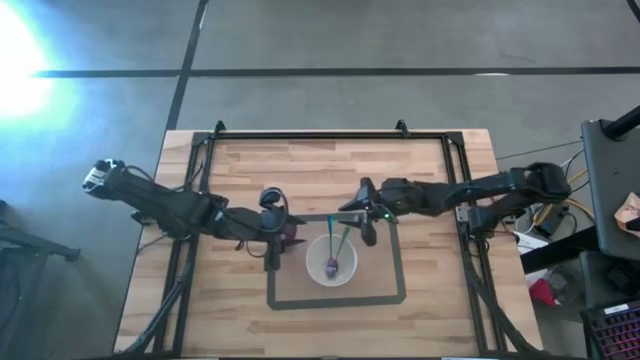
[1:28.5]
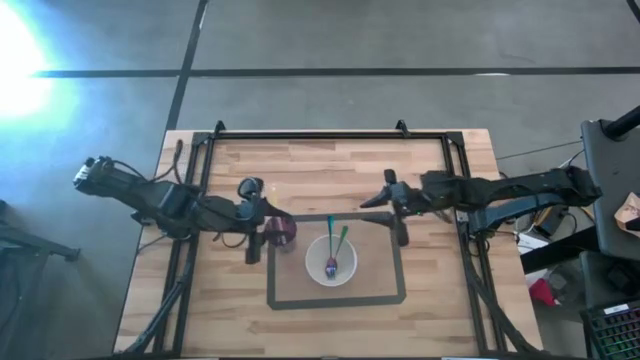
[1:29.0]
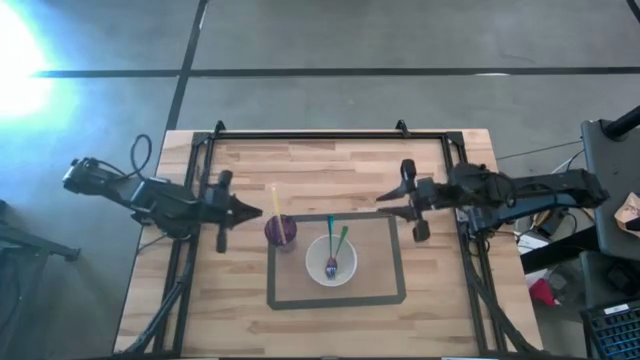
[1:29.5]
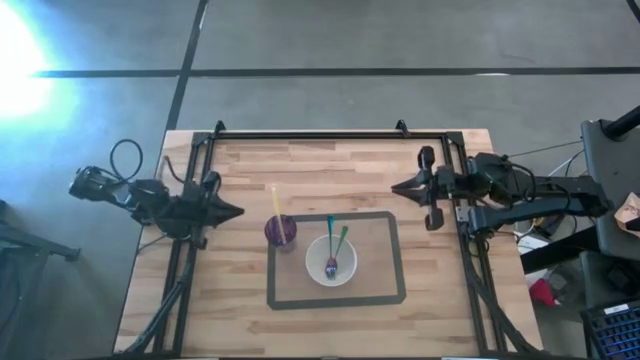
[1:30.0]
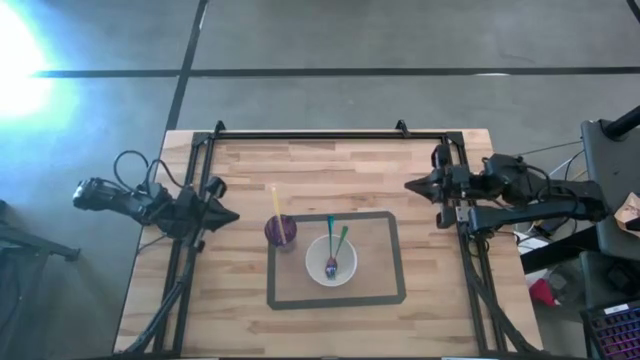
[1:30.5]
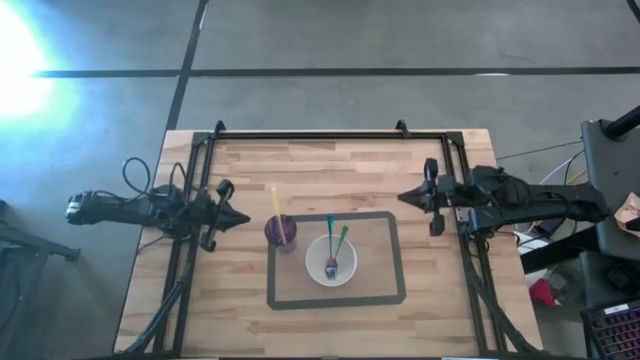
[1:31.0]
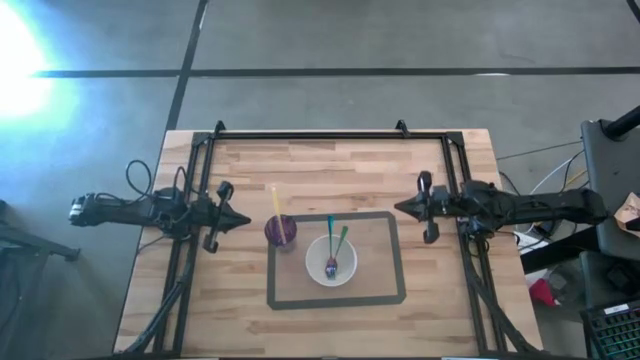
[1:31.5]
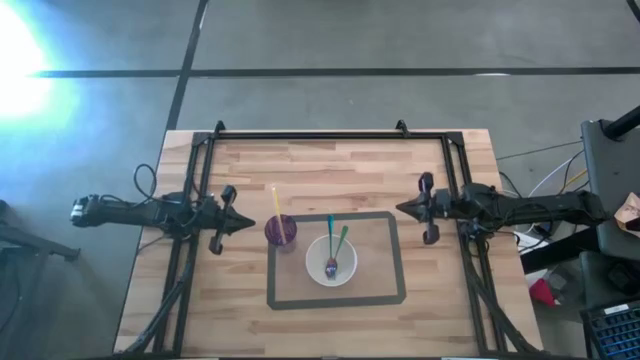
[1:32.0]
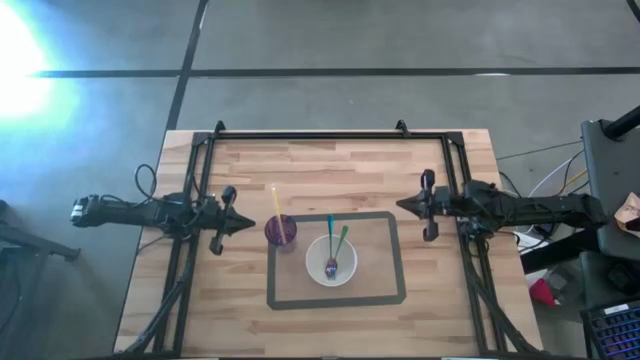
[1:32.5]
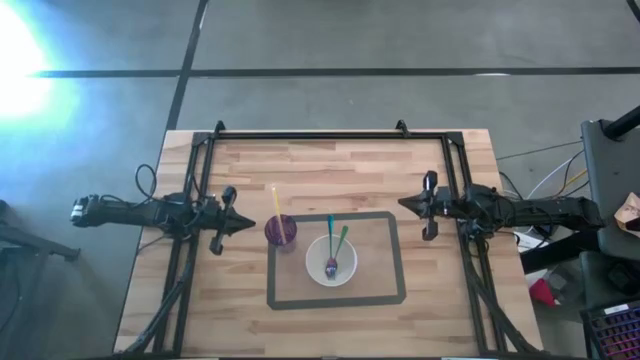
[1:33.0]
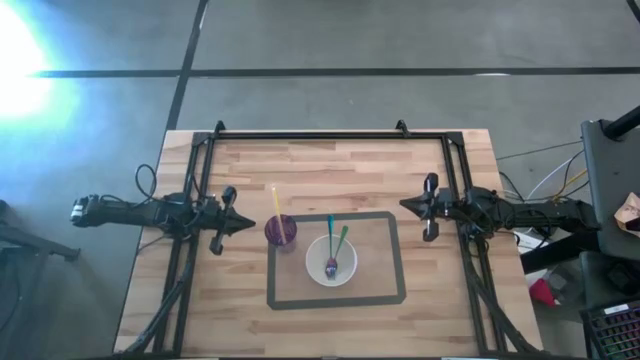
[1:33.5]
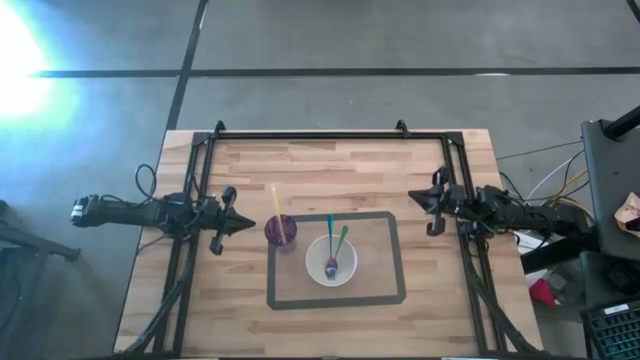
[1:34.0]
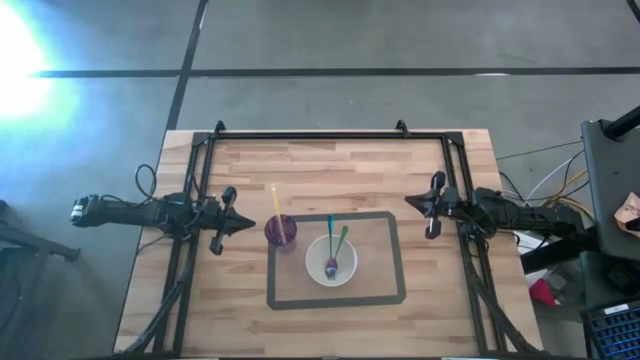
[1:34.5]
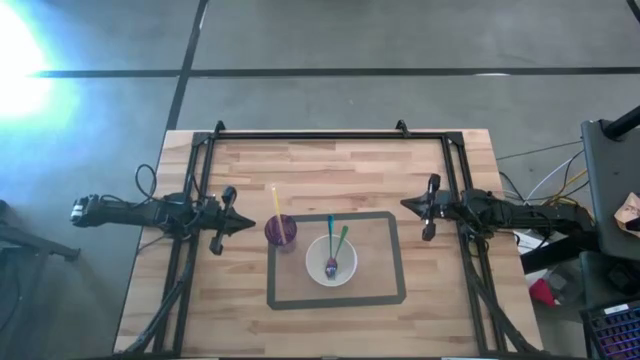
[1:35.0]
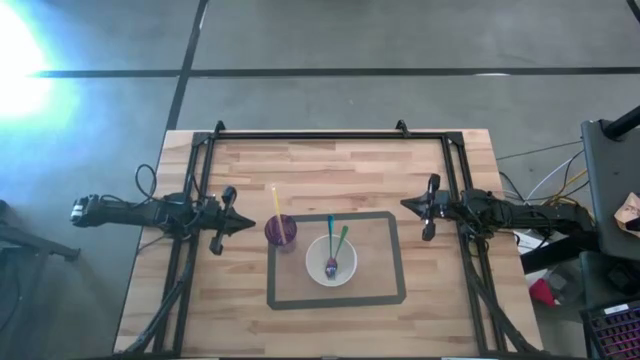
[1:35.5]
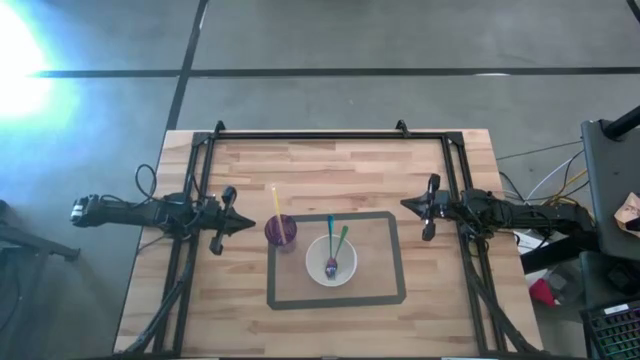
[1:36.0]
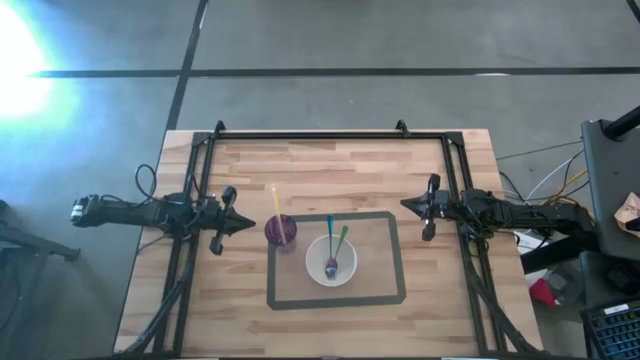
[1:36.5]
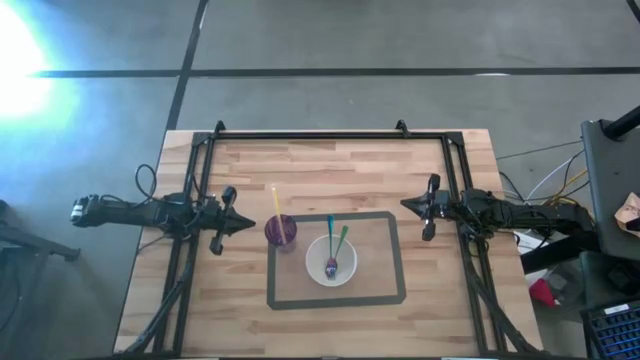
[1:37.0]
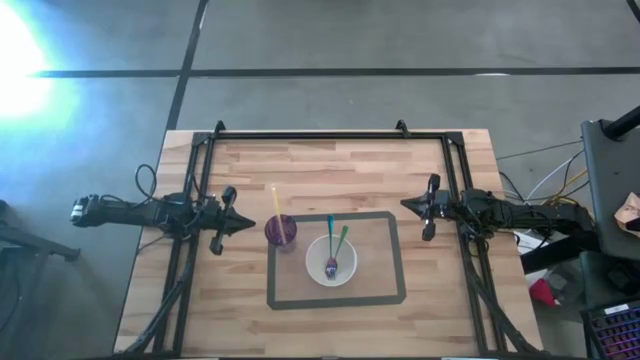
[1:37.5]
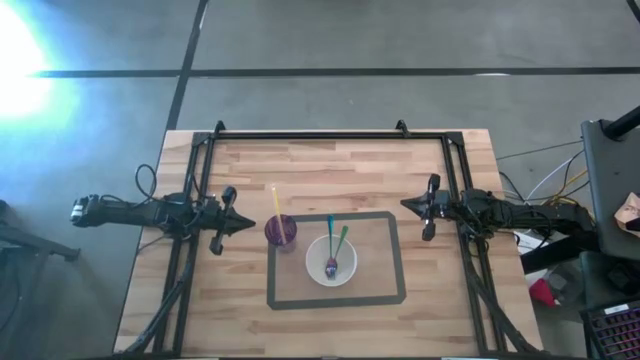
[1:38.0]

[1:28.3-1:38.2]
Task: Pick & Place Utensil
Return to Home Position

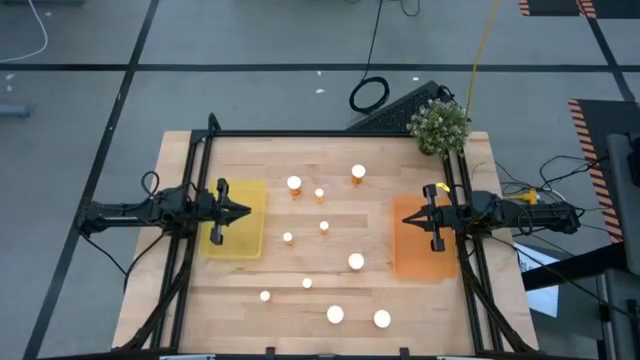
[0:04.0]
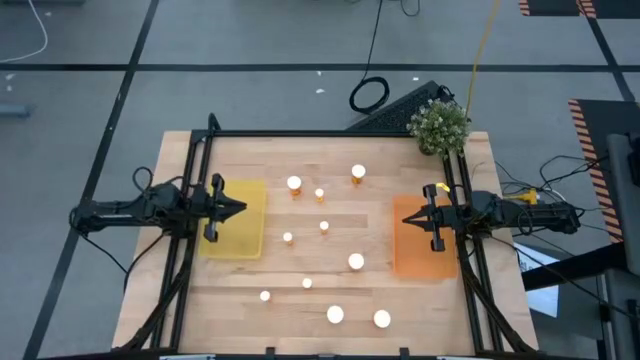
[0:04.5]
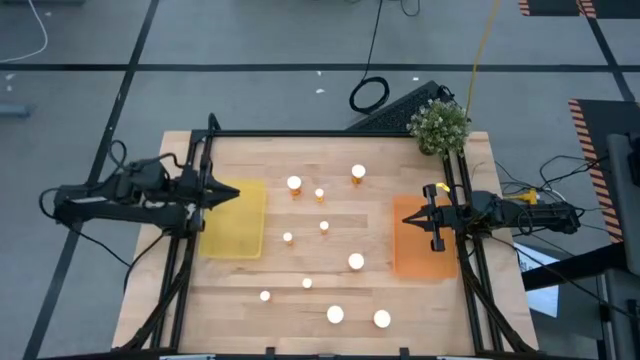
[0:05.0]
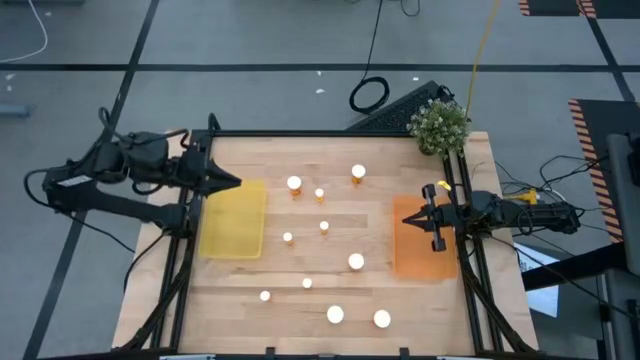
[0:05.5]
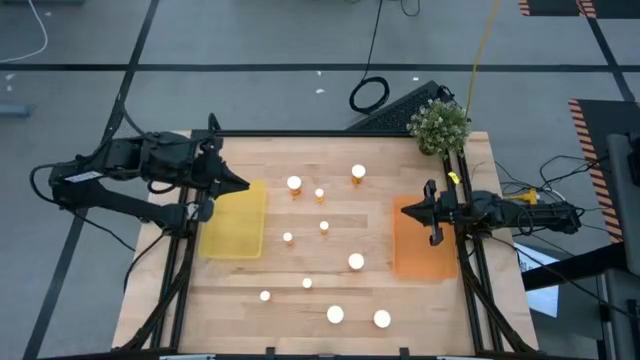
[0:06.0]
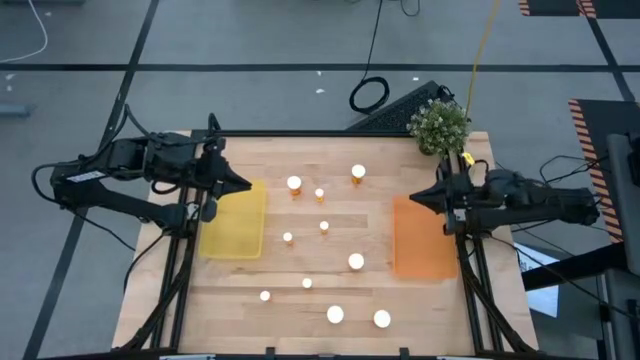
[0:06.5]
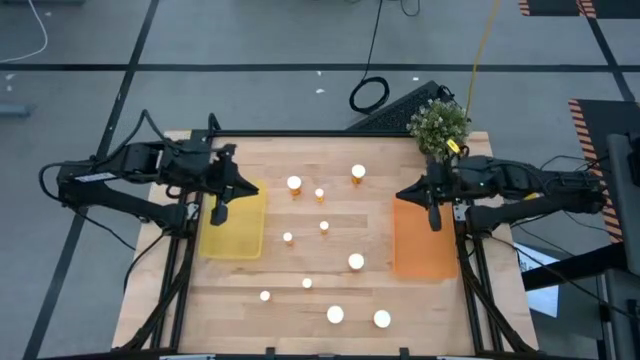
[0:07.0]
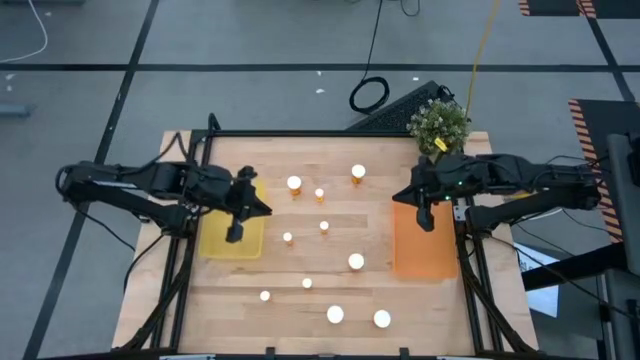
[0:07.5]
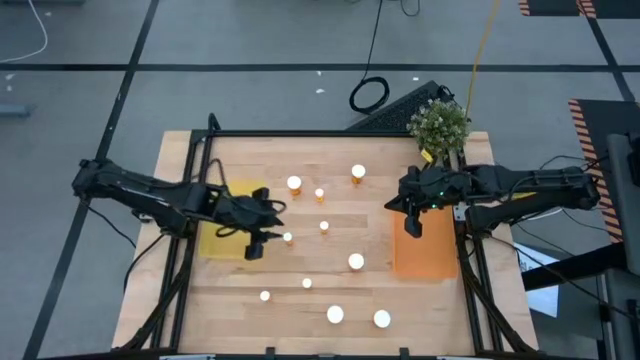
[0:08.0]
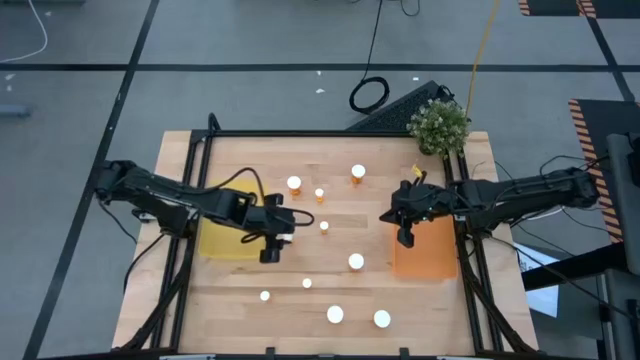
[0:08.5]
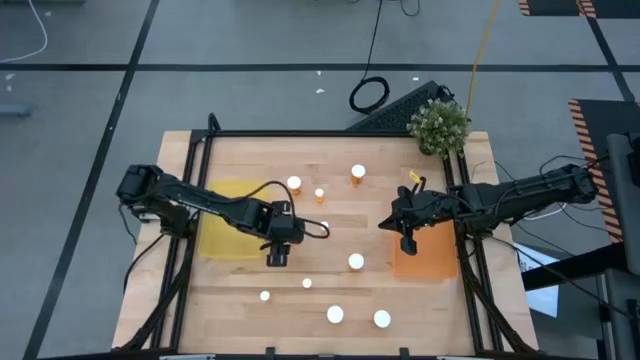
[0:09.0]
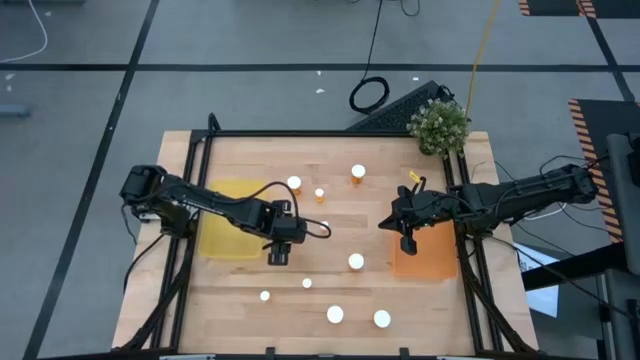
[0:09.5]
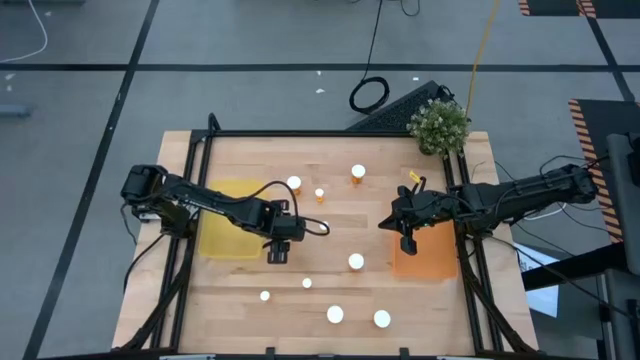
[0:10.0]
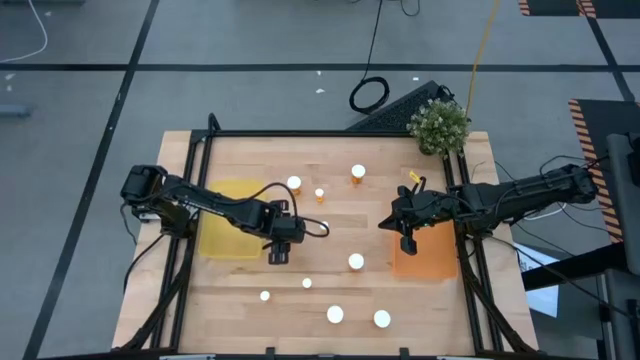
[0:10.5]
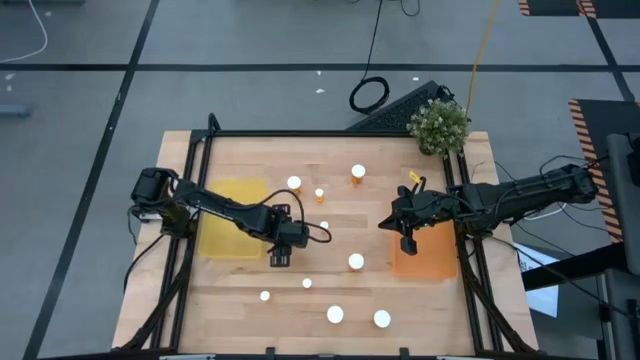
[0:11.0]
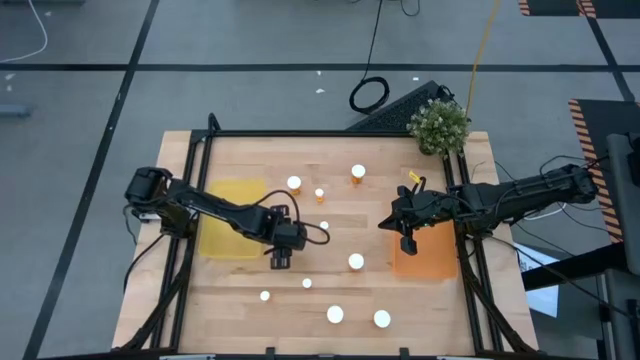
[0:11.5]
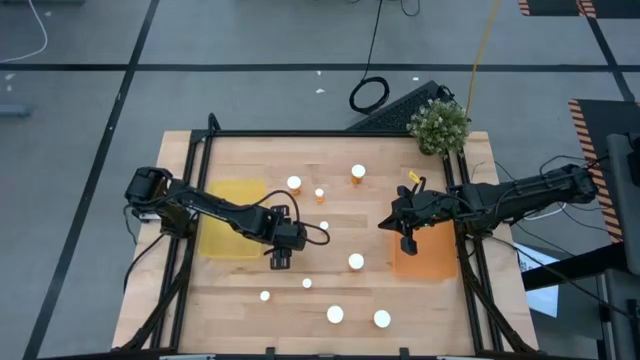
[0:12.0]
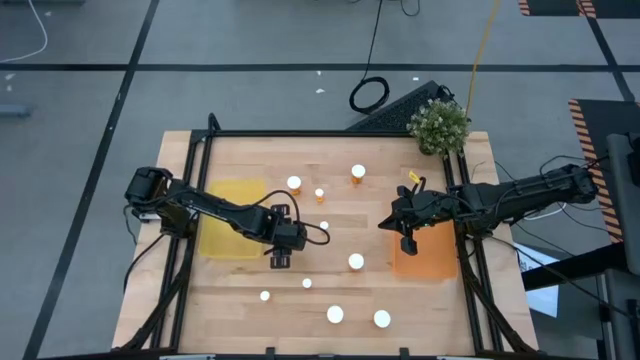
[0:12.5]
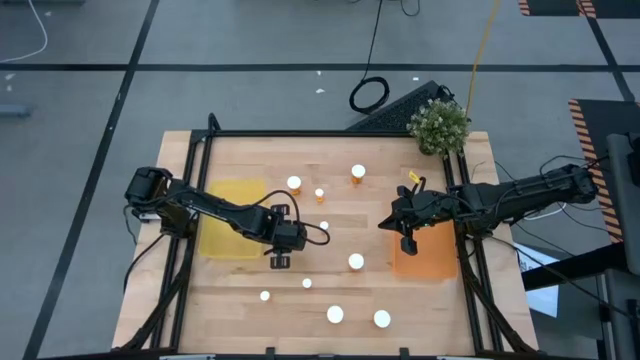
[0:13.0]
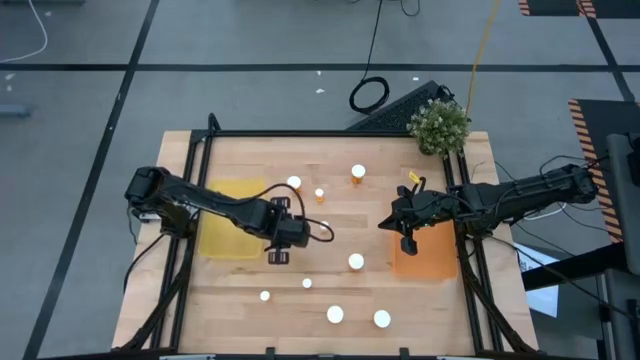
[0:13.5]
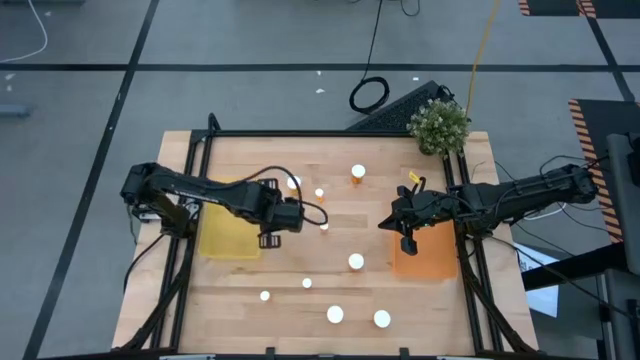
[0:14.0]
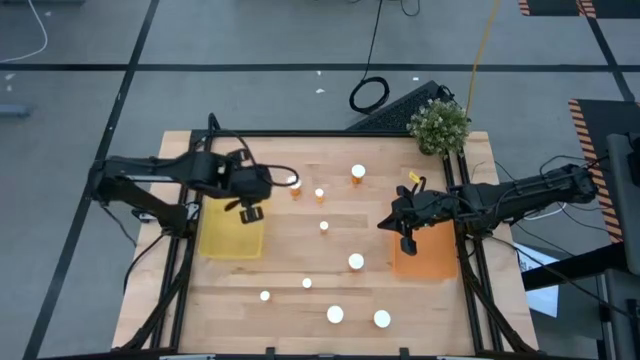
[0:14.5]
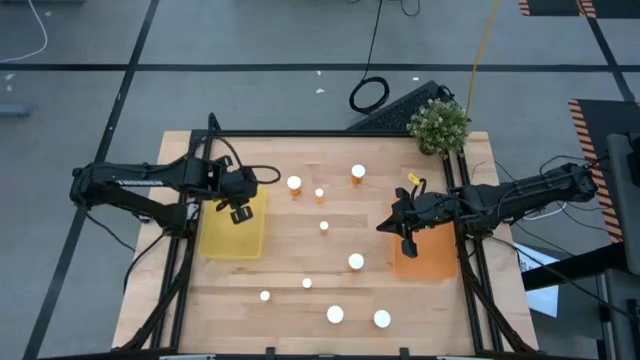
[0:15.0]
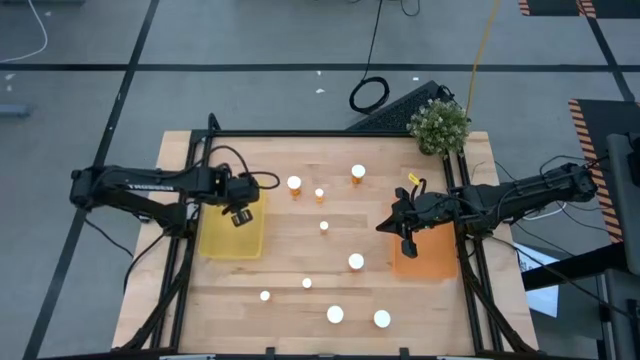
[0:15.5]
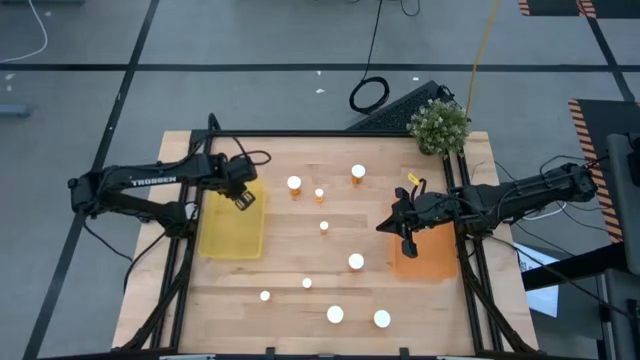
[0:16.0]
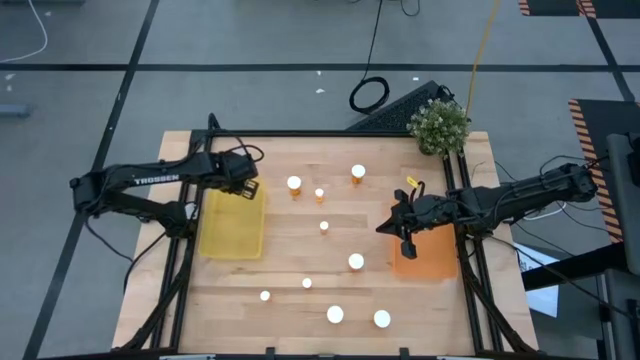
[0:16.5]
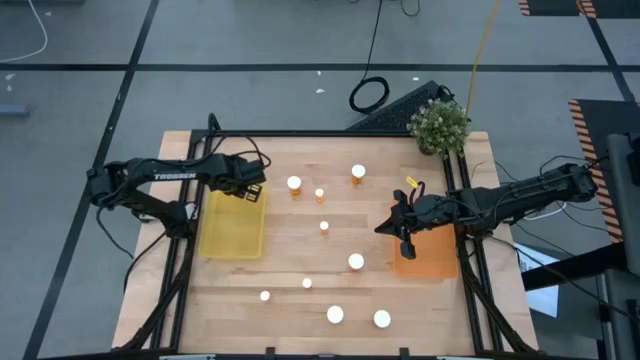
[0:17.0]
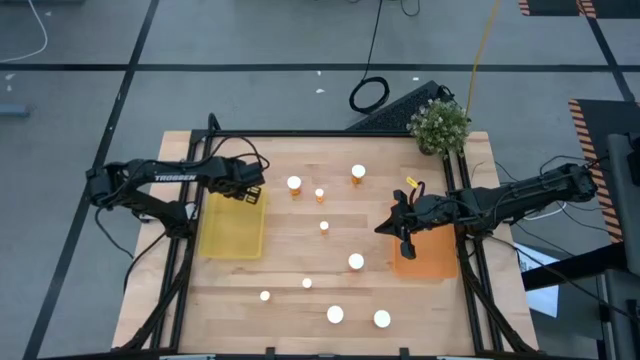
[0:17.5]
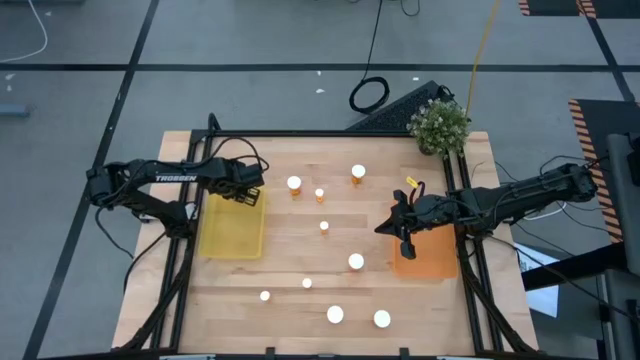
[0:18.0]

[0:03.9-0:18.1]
Task: Pick and place medicine bottles into bin by pill shape (circle, oval)
Put the small orange pill bottle into the yellow bin
